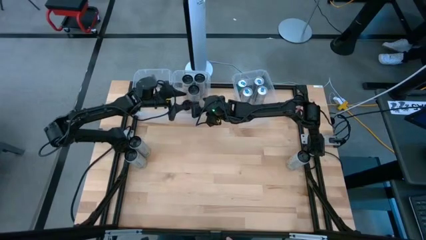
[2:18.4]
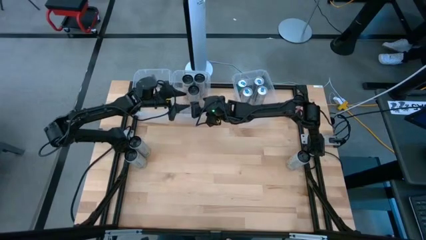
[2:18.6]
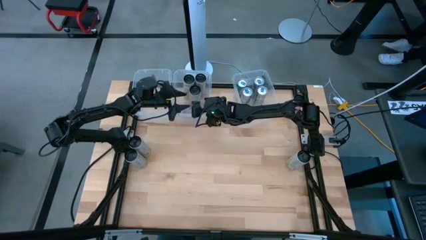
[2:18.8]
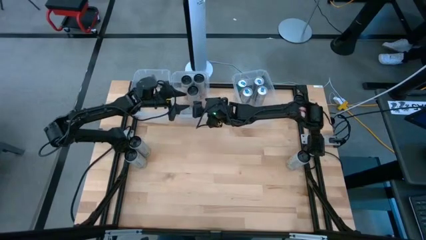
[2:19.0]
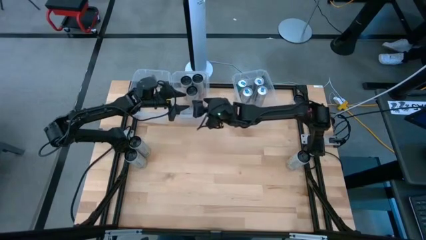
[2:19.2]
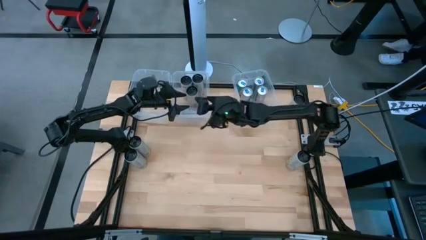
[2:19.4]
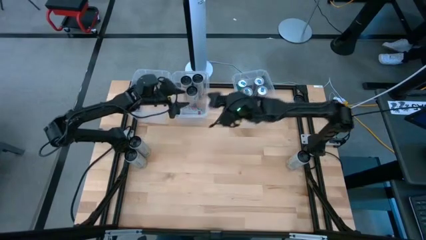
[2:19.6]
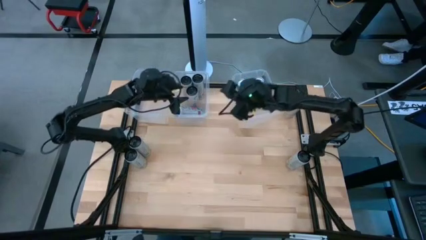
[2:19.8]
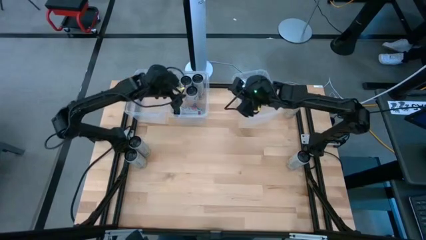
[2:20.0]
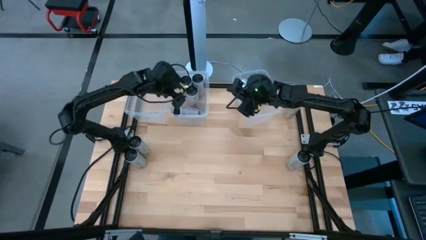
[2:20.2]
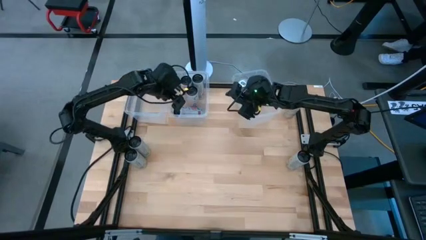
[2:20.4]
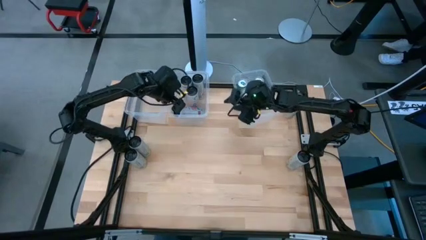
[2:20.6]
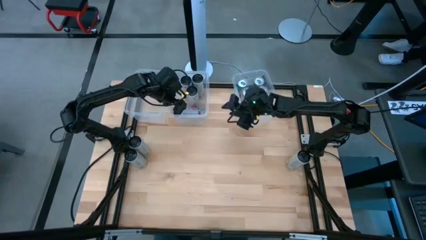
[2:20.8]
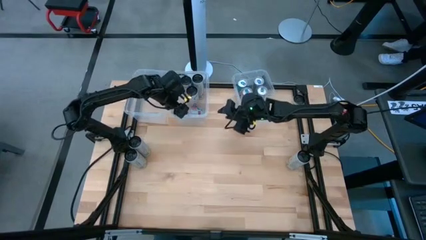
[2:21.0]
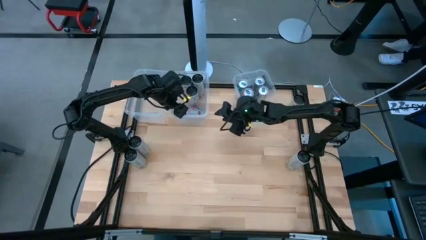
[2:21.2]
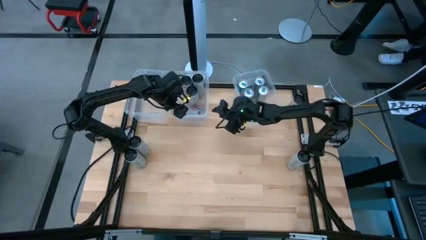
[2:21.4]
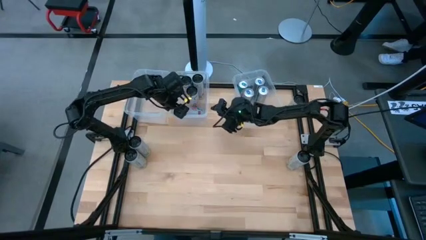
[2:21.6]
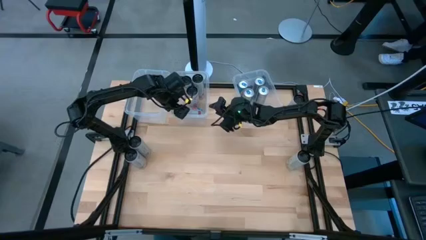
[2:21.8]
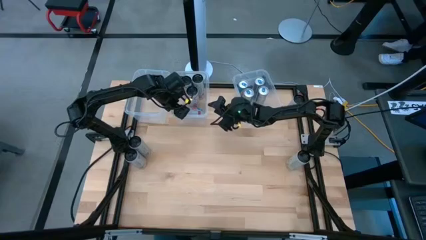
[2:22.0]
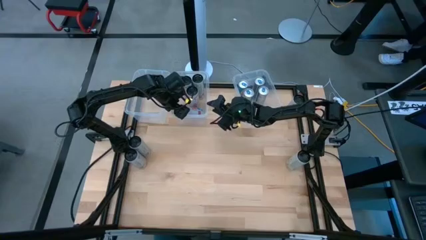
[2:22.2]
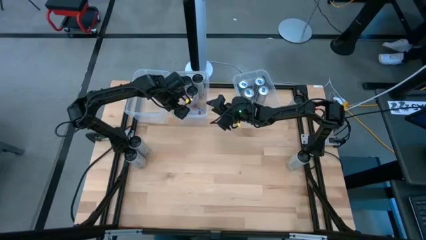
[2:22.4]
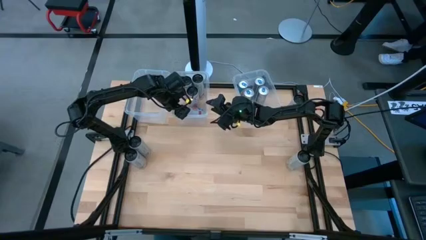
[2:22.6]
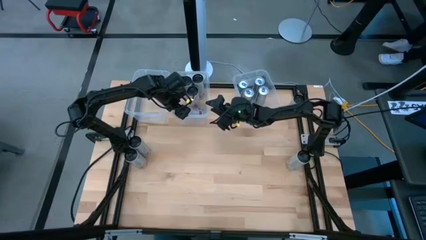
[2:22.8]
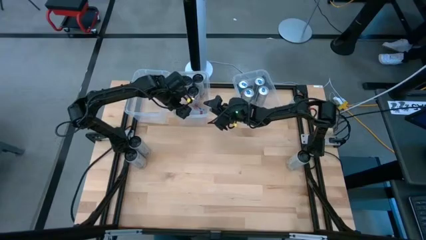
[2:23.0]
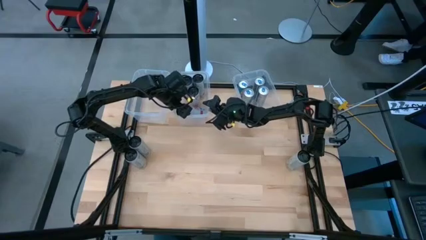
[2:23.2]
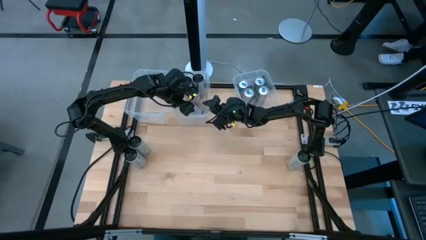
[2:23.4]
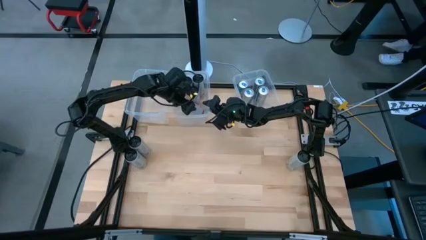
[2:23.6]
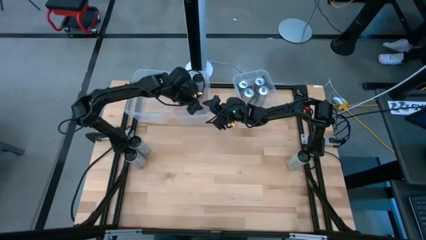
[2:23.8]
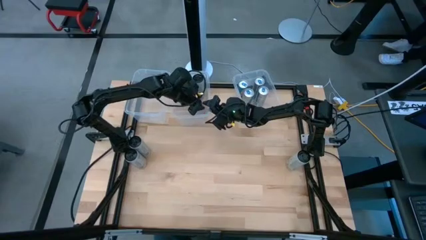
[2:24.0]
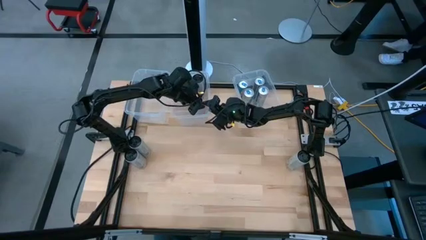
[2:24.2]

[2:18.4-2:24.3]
Task: Sort soda cans
Put the top right white-pink soda can into the top center transparent bin

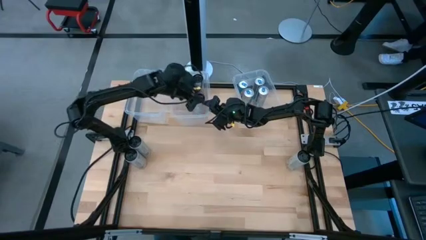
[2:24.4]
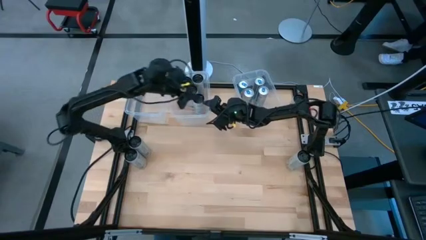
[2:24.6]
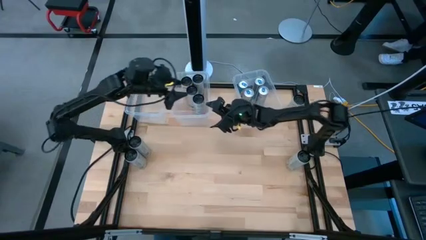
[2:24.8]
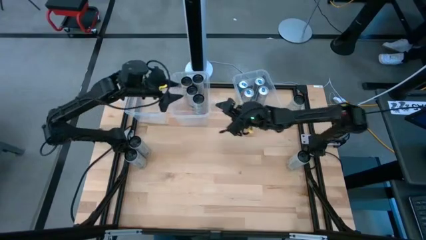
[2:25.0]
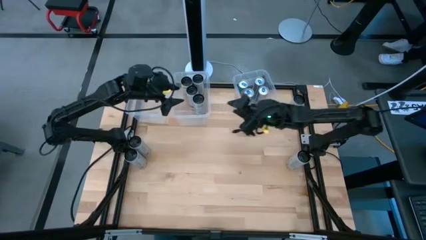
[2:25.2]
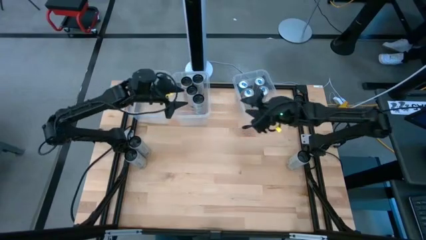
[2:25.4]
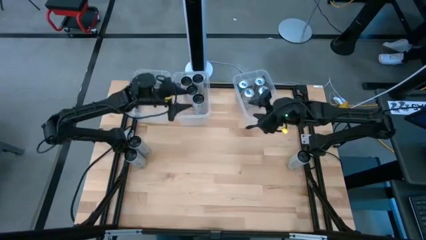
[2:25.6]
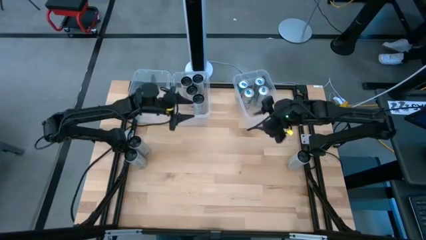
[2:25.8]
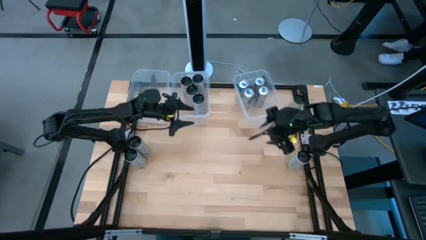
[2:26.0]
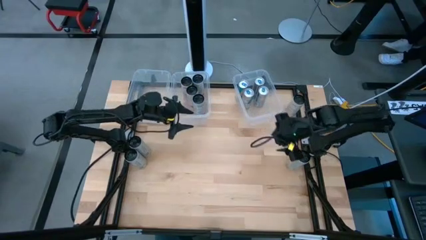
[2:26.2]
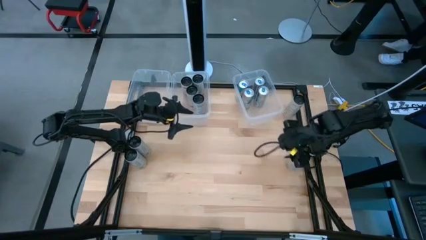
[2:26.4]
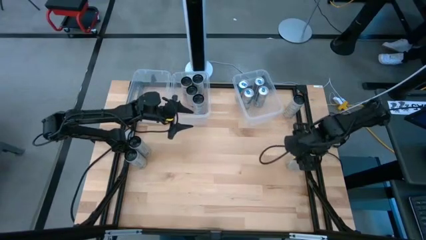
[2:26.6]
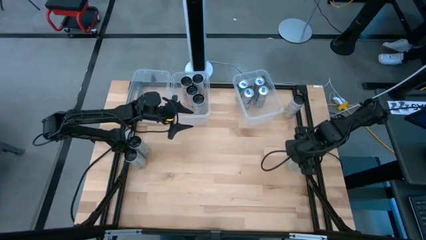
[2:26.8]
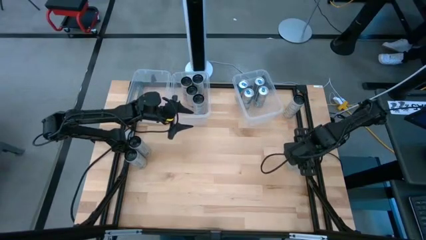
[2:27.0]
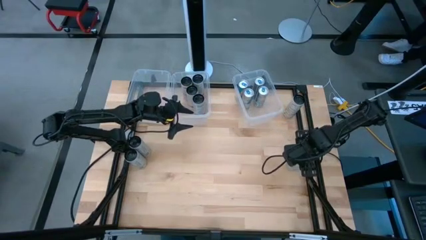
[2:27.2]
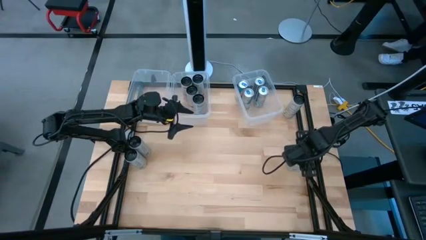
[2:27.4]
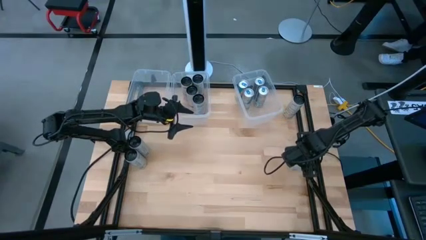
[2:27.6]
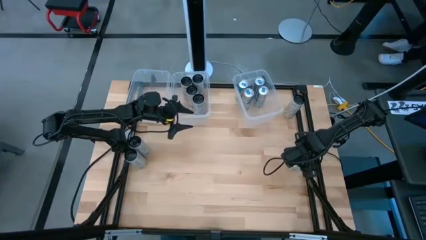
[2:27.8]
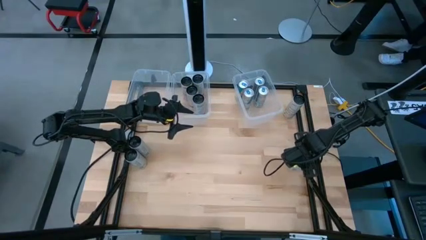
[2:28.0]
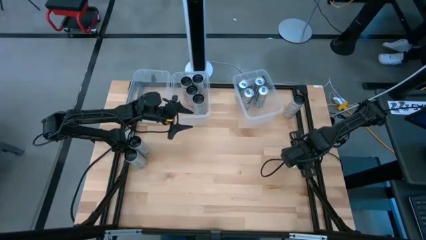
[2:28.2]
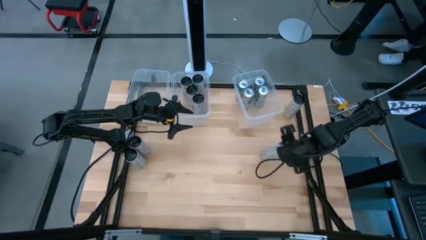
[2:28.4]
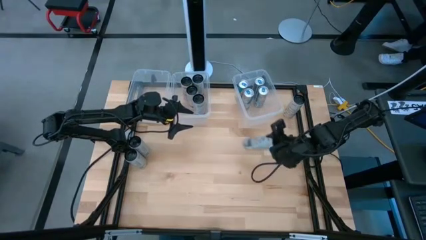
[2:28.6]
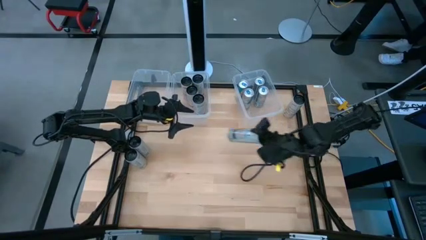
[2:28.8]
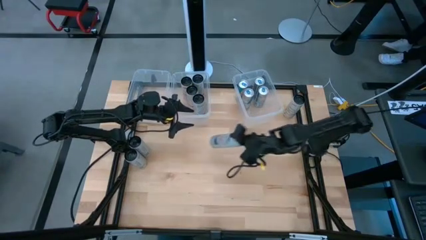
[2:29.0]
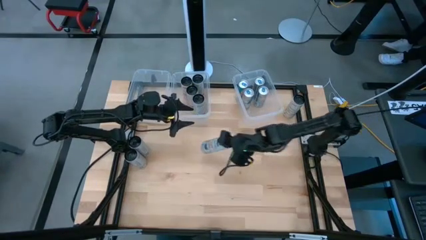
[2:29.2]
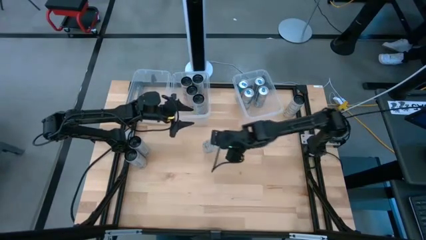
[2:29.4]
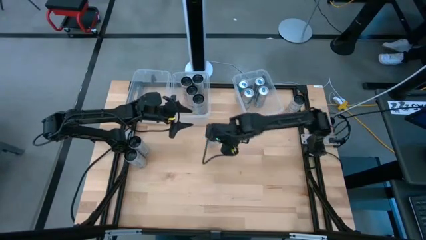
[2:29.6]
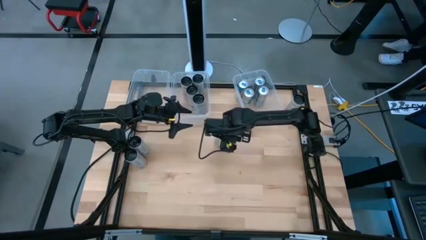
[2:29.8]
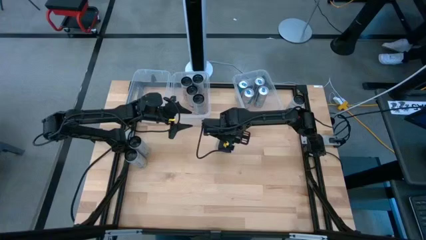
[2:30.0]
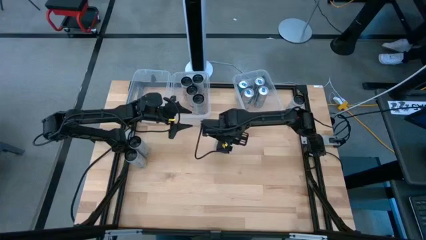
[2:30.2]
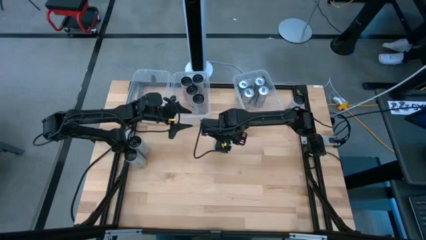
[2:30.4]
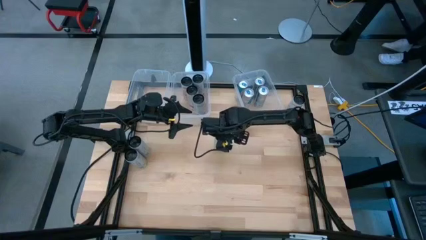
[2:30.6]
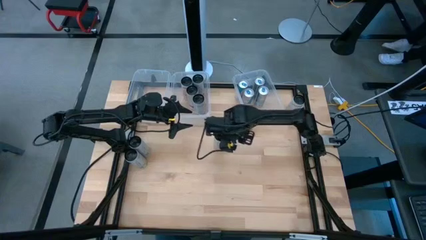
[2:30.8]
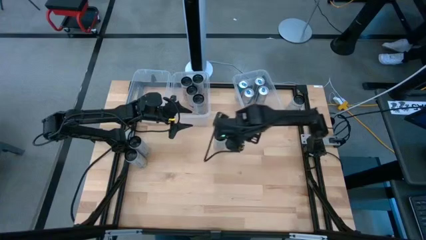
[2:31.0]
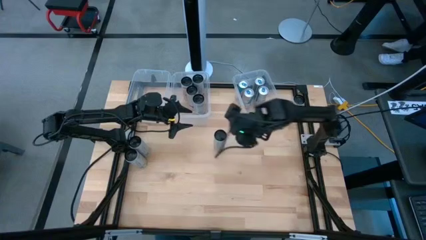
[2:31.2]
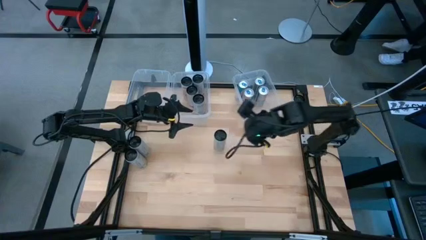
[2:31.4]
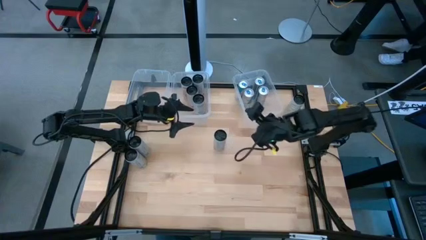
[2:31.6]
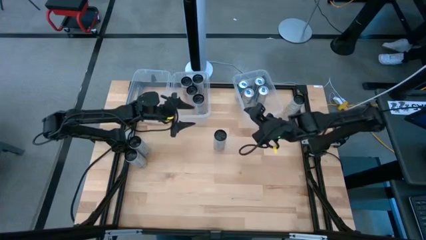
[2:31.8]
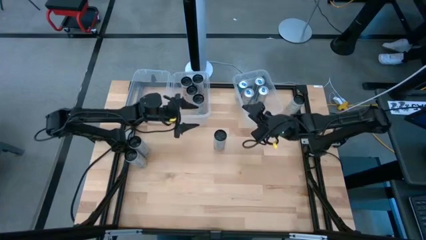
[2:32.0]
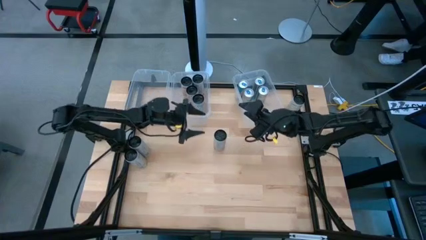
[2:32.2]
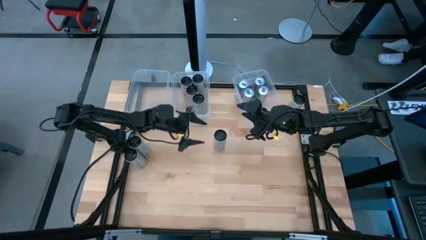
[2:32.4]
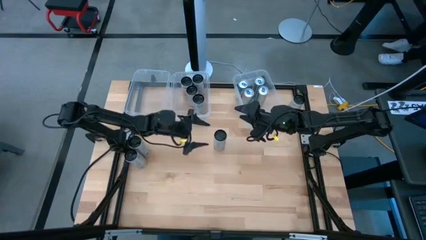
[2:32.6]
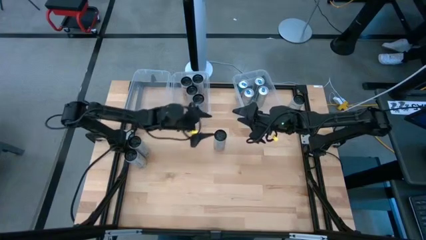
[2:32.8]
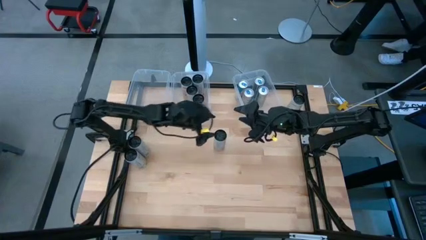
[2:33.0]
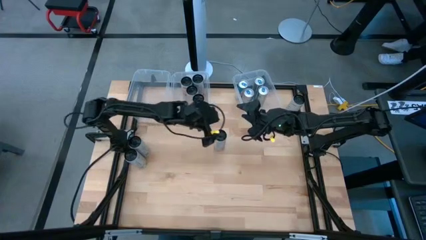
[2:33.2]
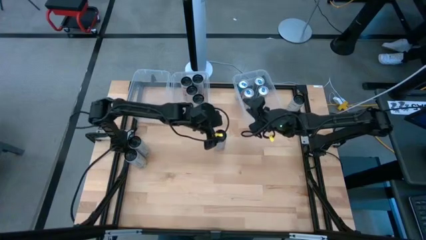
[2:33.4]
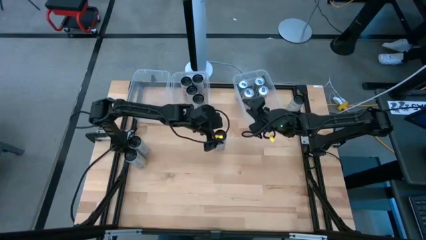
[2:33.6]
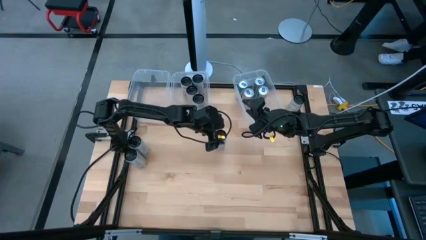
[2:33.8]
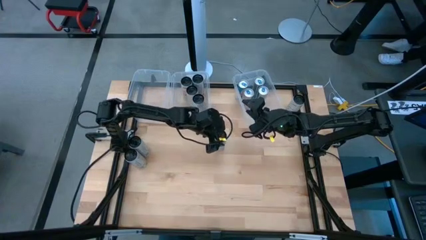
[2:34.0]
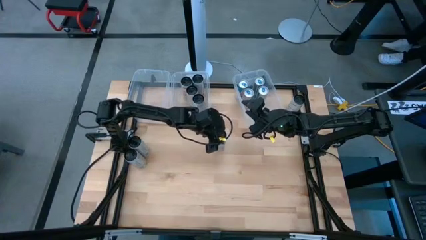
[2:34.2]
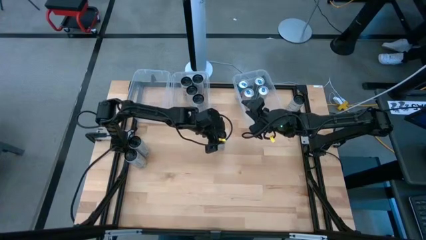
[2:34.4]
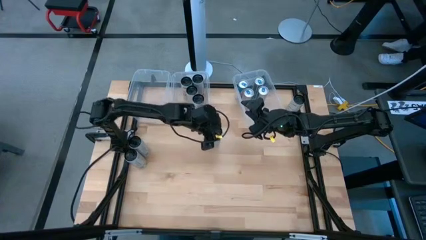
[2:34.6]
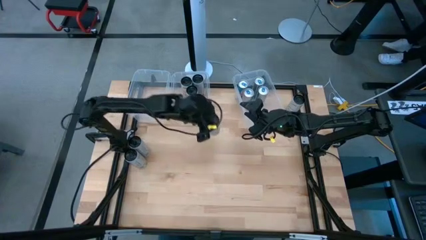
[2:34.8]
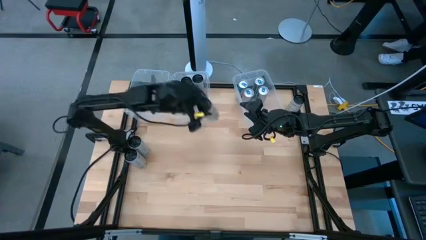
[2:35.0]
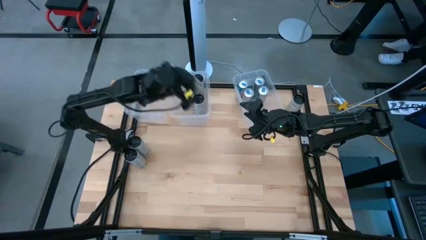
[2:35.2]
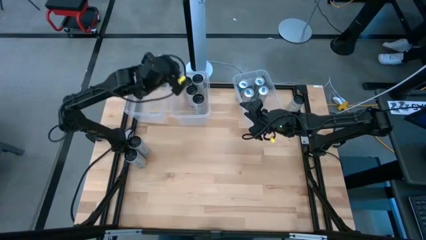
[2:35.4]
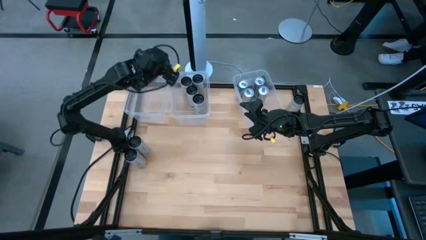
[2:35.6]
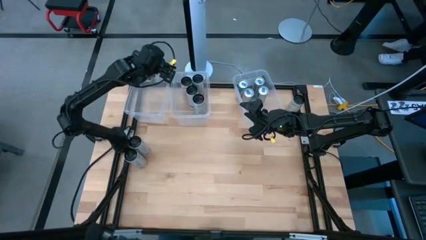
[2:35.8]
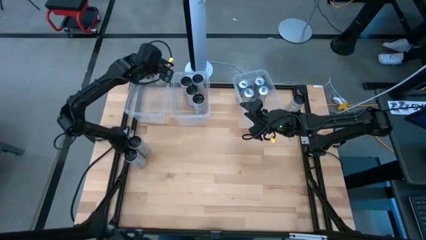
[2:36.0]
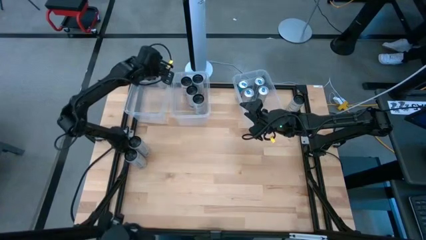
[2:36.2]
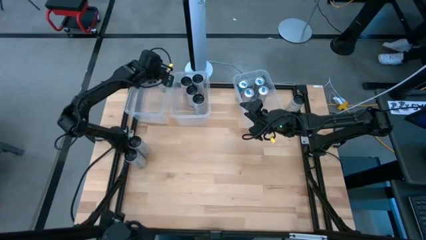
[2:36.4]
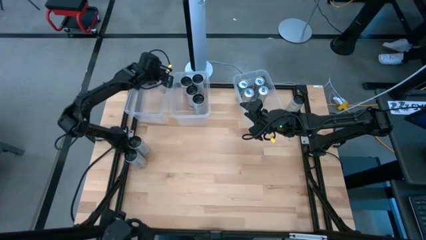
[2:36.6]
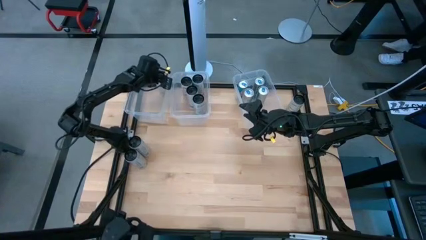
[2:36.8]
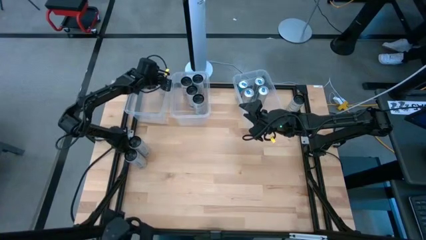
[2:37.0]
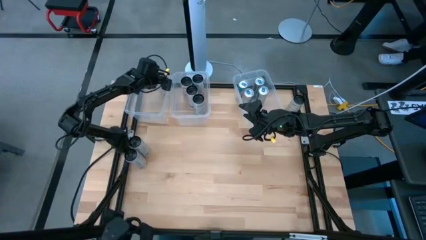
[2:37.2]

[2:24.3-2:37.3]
Put the bottom right white-yellow soda can into the top left transparent bin
